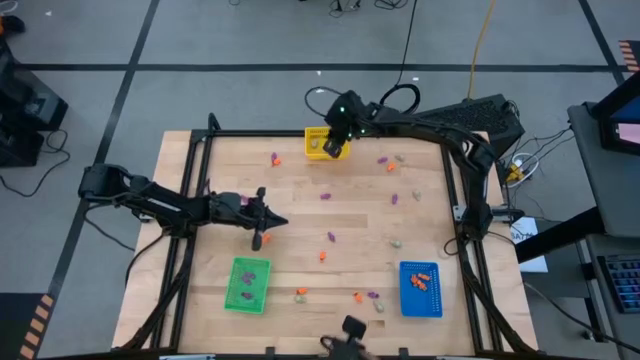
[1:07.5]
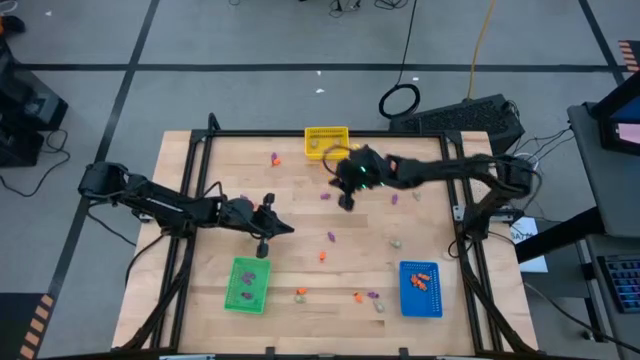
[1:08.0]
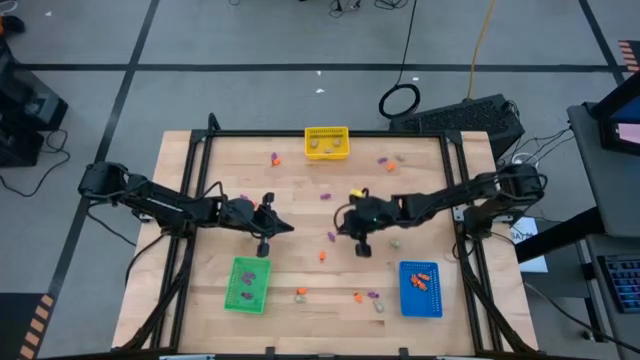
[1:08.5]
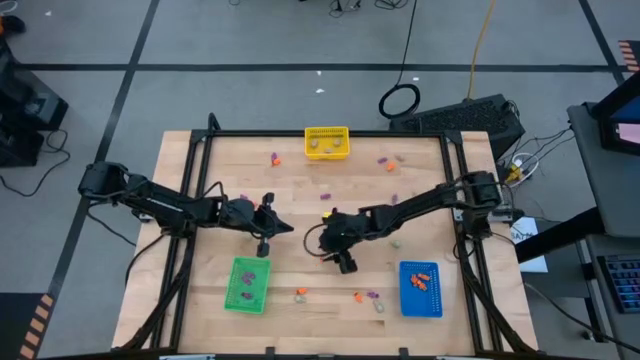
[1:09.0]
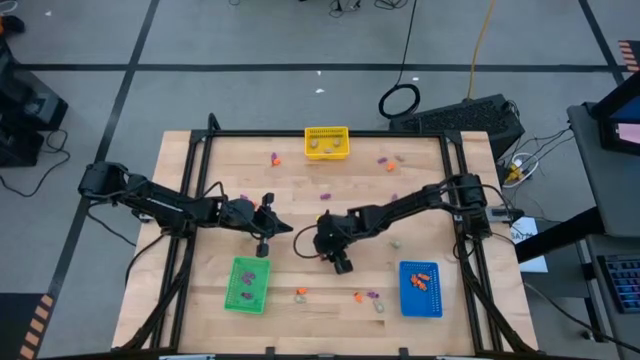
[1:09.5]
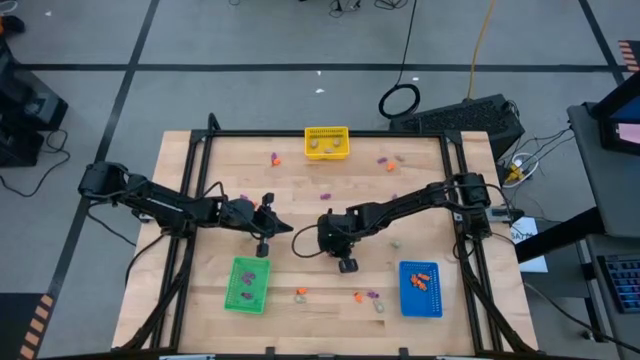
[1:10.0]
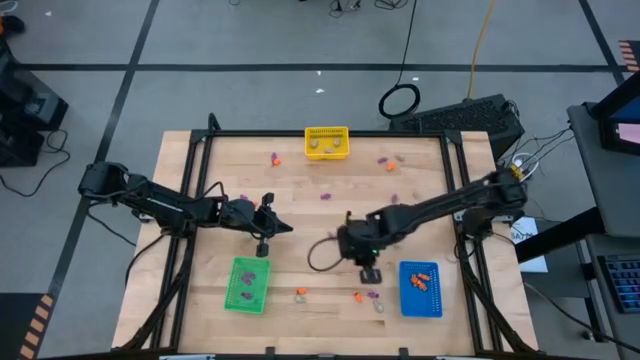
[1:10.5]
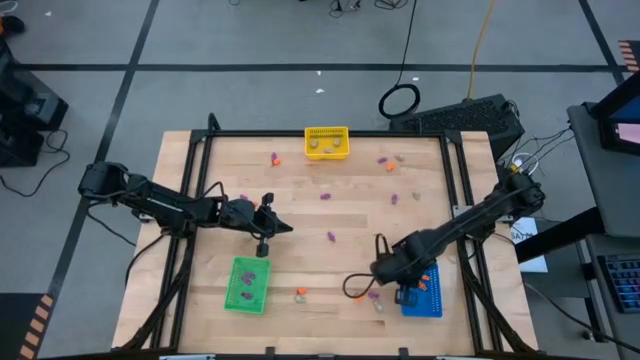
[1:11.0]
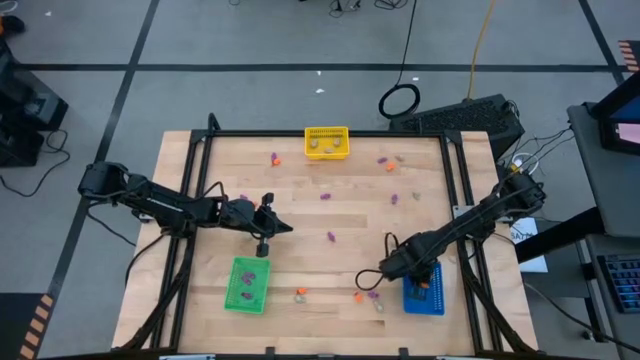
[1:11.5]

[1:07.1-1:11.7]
Task: Sort Halloween decoration
Put the orange skeleton toy into the blue bin

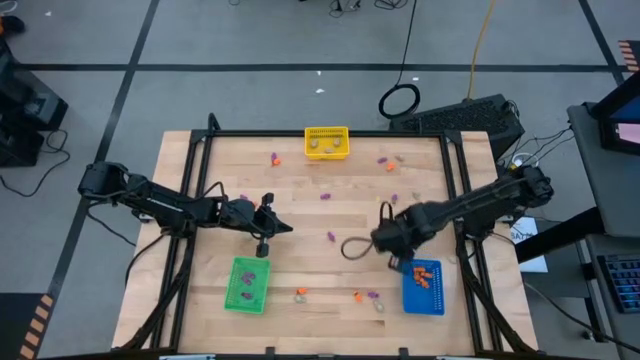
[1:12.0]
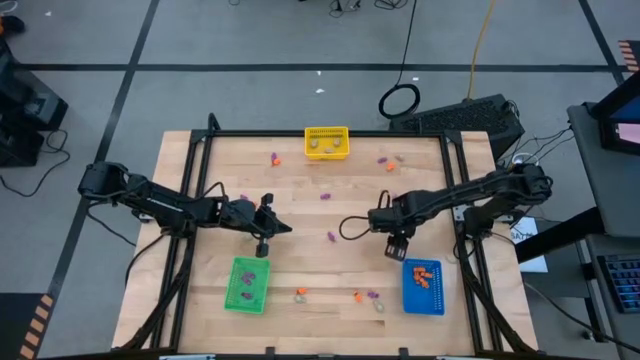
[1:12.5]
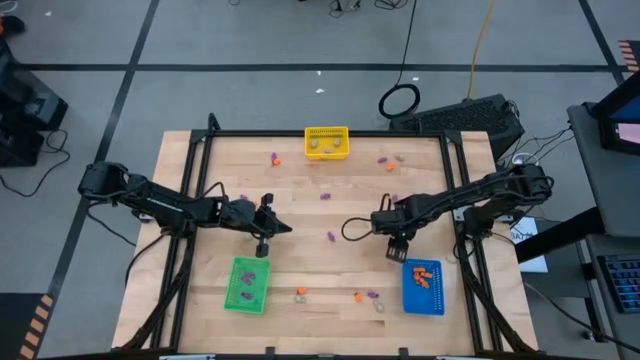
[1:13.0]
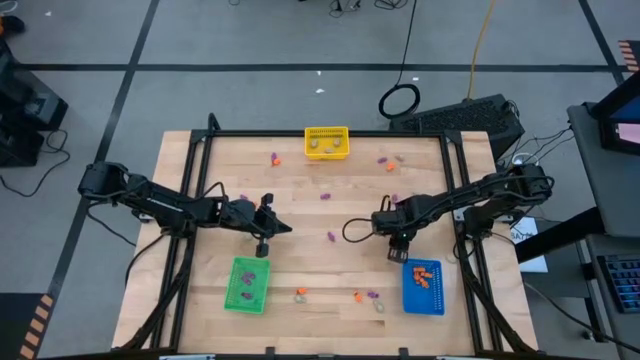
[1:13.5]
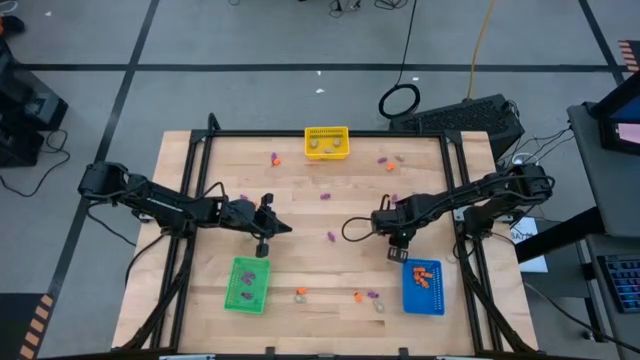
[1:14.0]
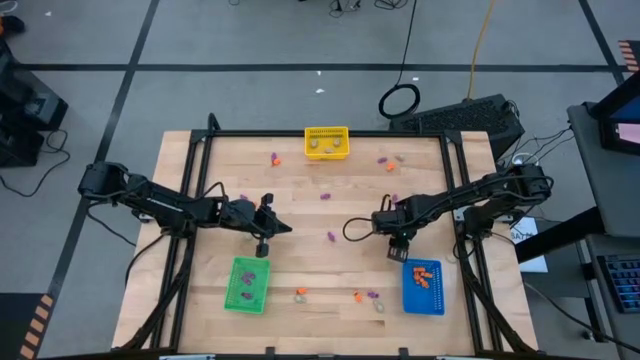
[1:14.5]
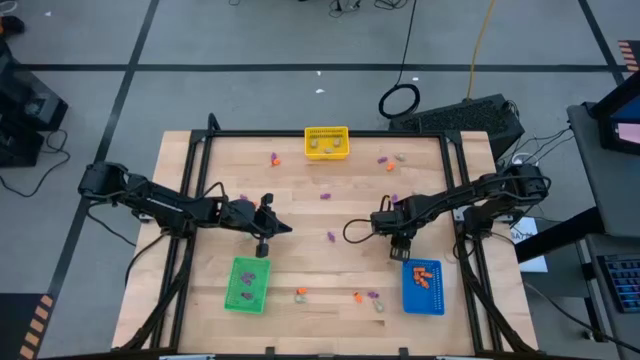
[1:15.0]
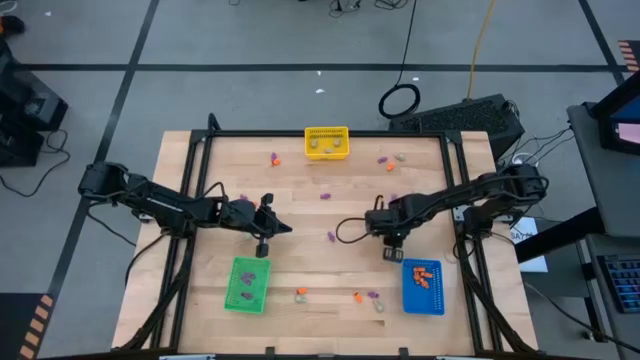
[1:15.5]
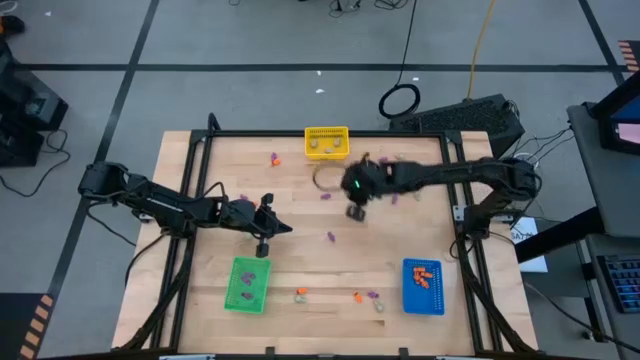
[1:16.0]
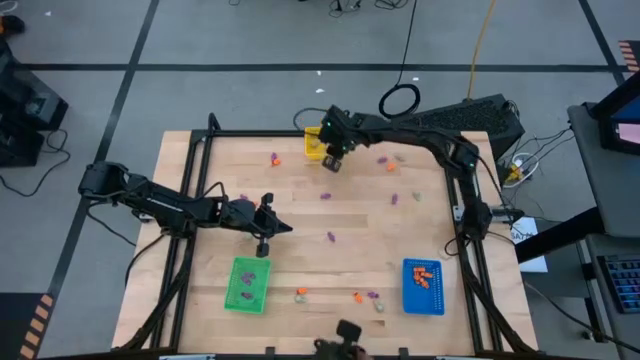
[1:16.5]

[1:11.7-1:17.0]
Put the gray skull toy into the yellow bin

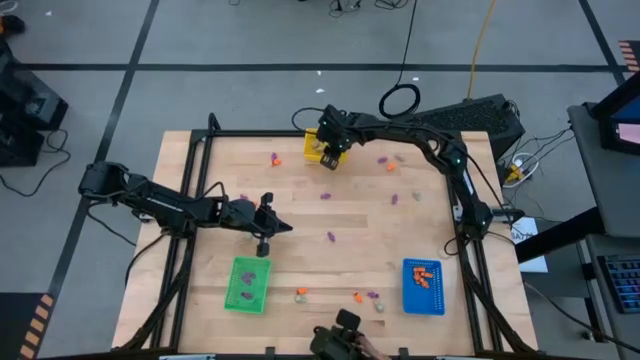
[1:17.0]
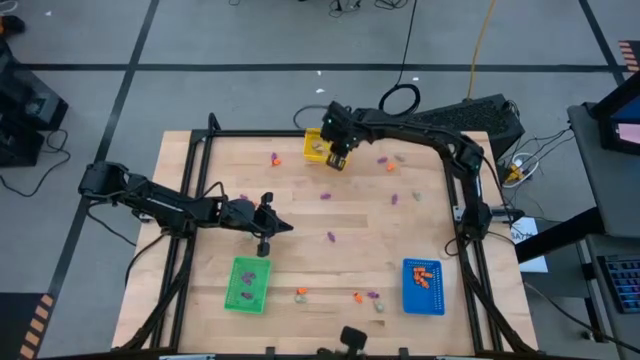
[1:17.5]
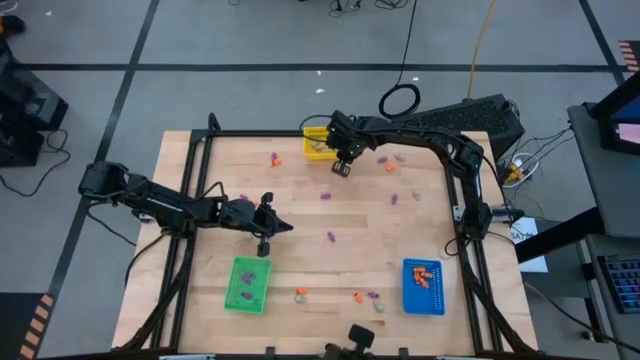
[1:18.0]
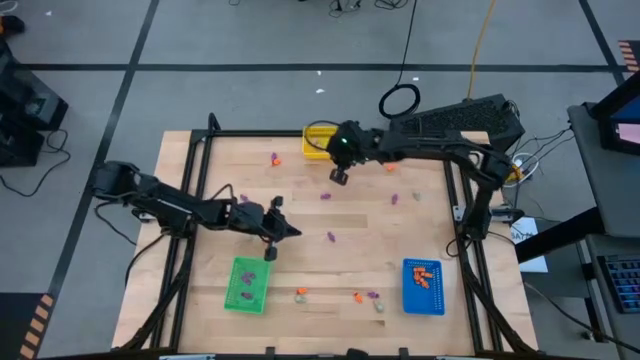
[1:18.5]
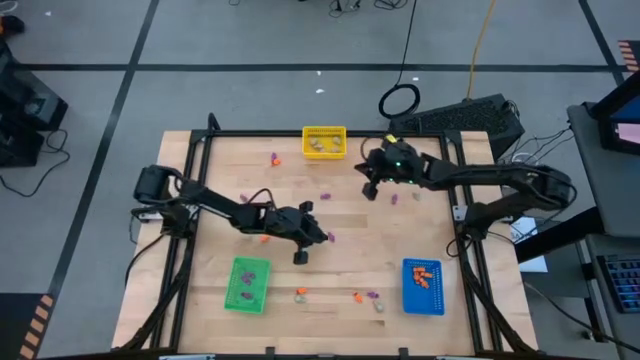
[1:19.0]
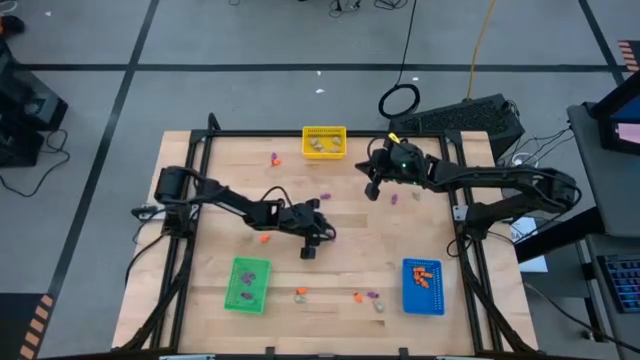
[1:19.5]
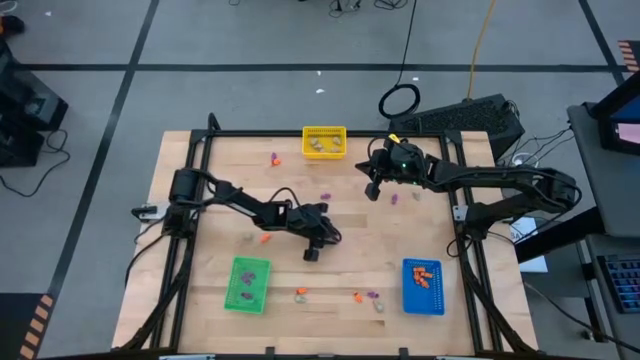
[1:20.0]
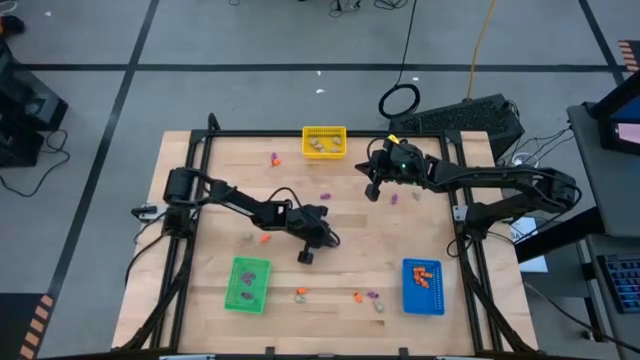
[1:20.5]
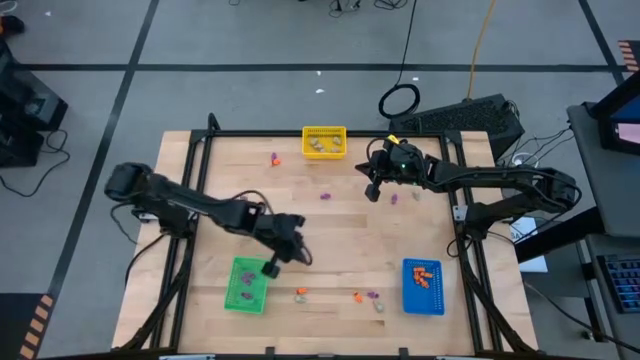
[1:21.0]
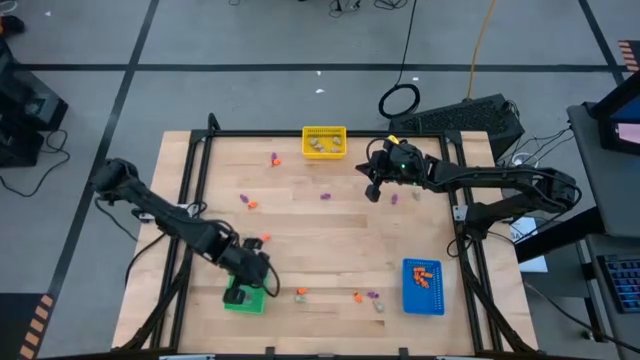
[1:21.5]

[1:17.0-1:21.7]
Put the purple skeleton toy into the green bin

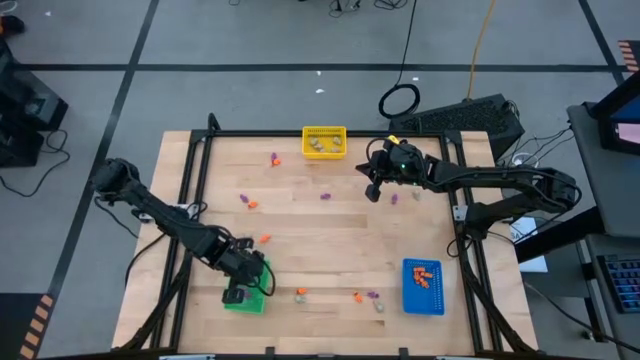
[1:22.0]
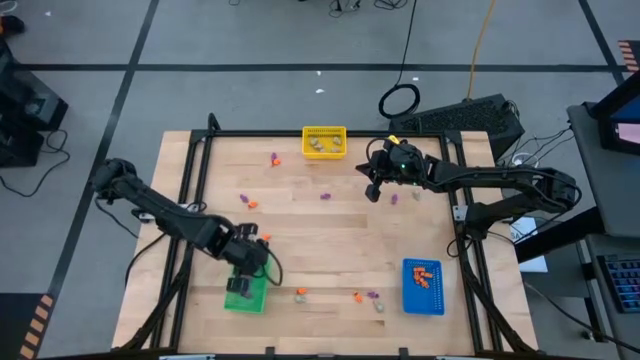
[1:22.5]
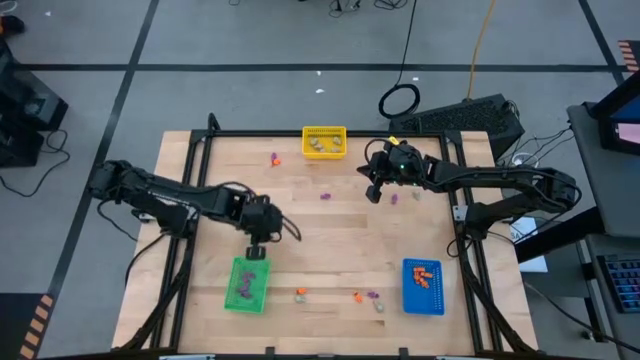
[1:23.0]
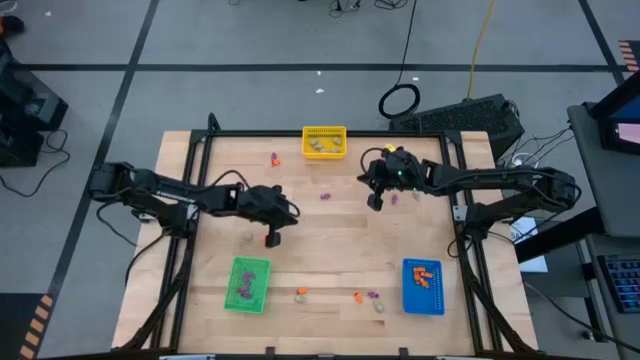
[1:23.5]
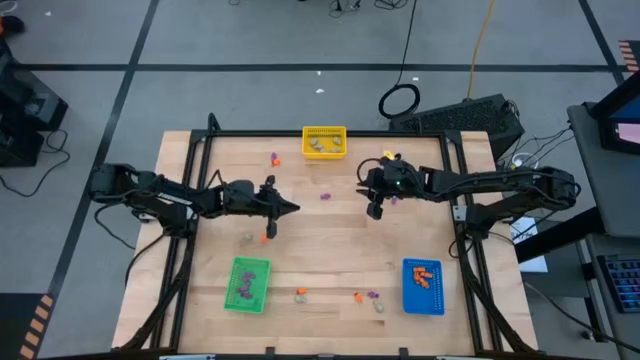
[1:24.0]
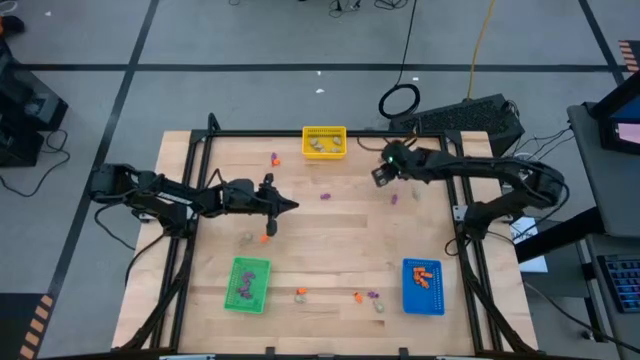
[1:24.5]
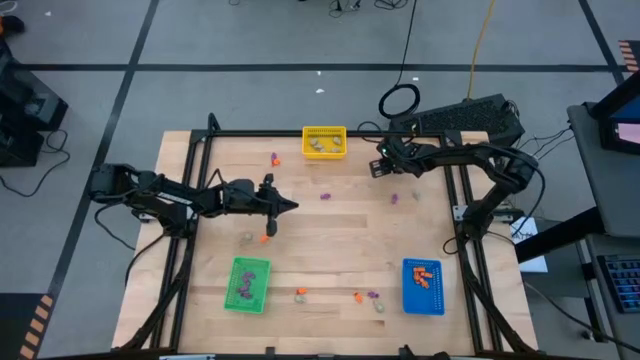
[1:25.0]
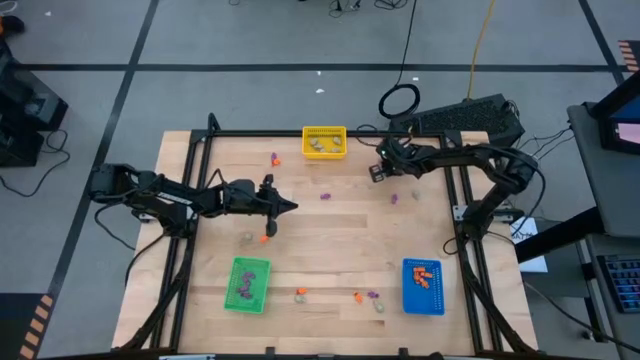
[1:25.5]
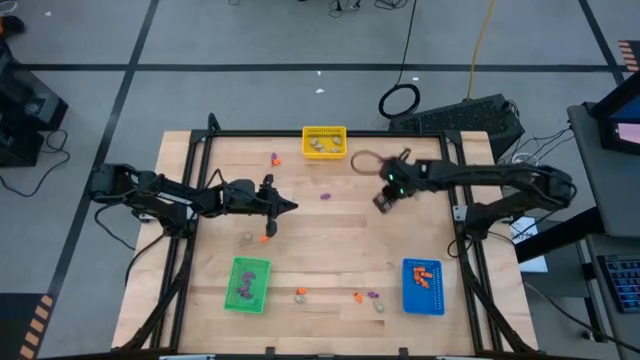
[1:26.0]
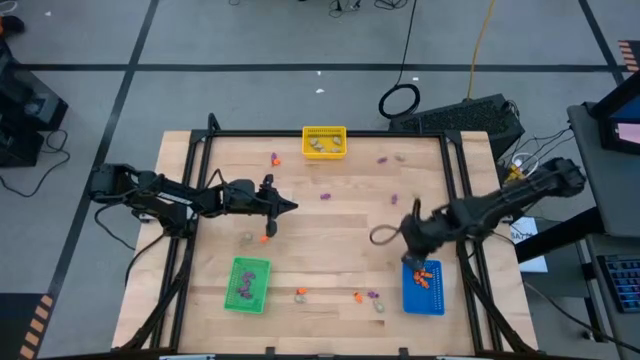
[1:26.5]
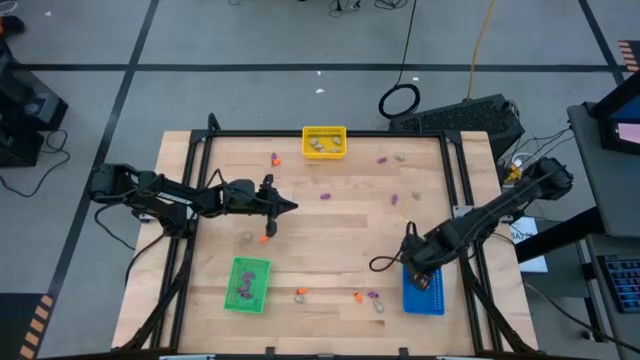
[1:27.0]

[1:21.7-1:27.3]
Put the orange skeleton toy into the blue bin
